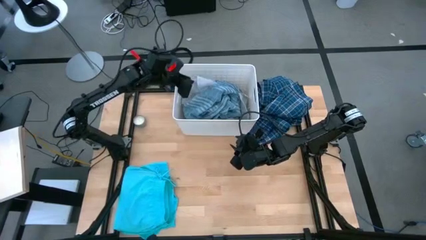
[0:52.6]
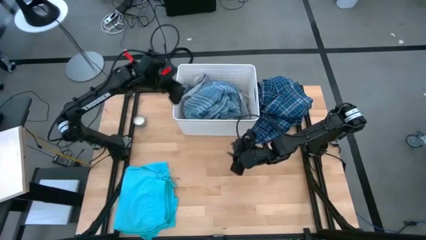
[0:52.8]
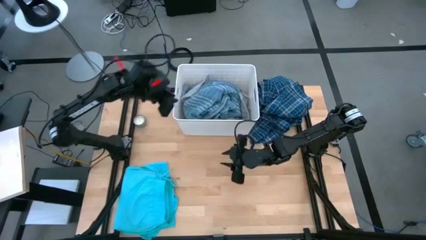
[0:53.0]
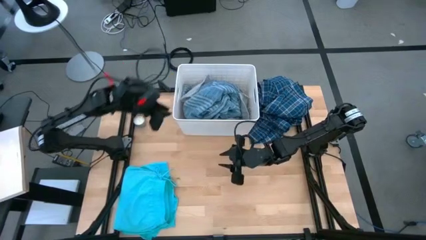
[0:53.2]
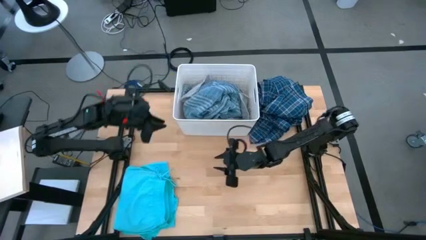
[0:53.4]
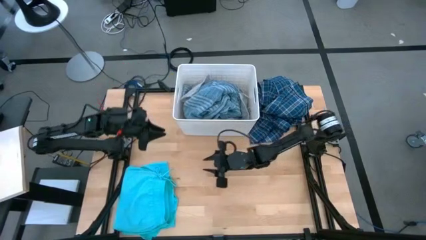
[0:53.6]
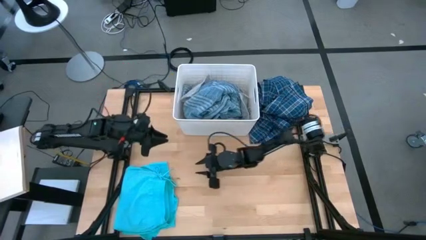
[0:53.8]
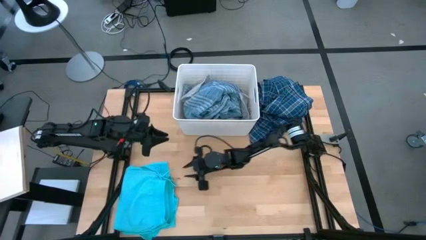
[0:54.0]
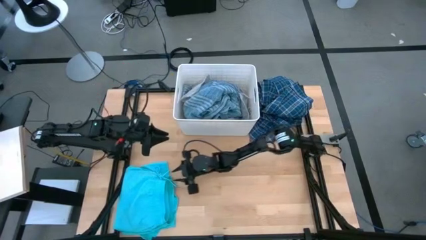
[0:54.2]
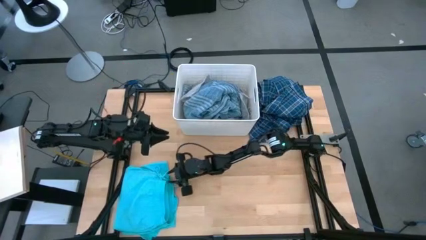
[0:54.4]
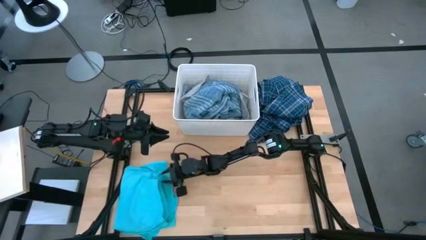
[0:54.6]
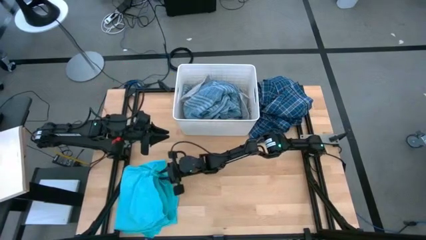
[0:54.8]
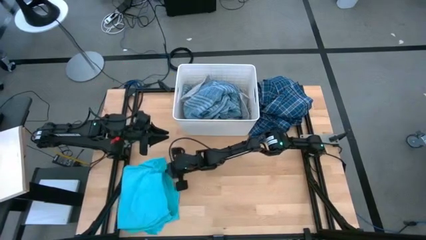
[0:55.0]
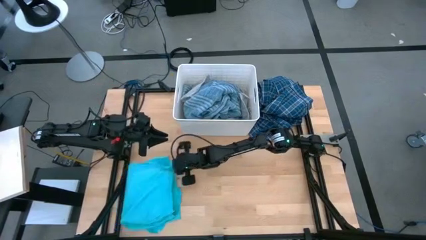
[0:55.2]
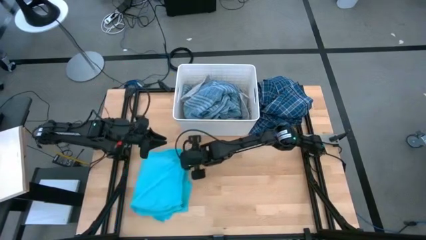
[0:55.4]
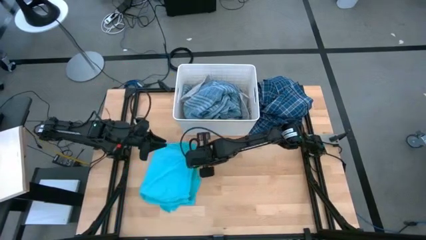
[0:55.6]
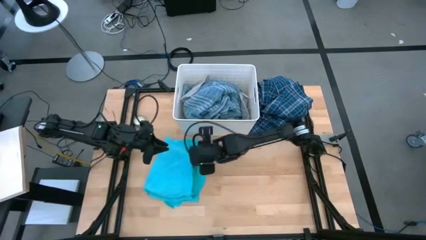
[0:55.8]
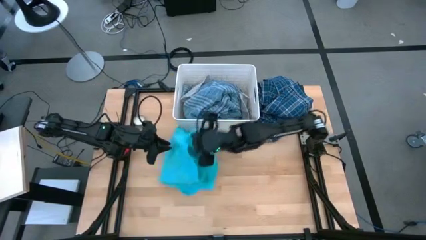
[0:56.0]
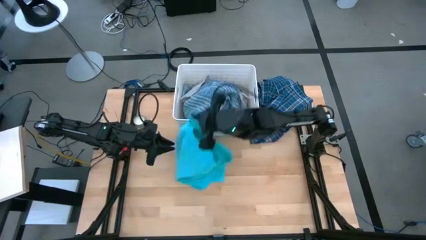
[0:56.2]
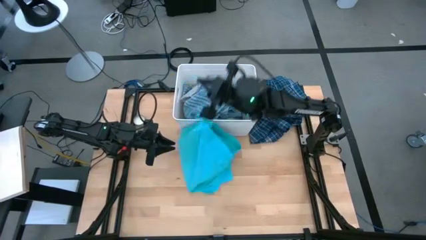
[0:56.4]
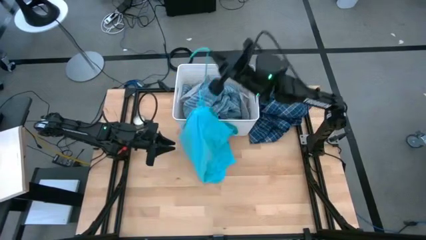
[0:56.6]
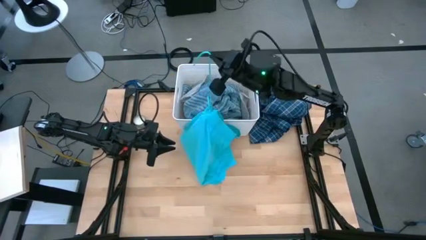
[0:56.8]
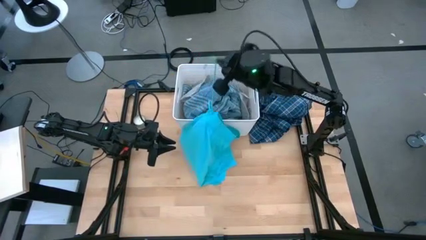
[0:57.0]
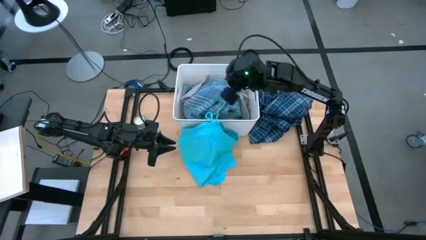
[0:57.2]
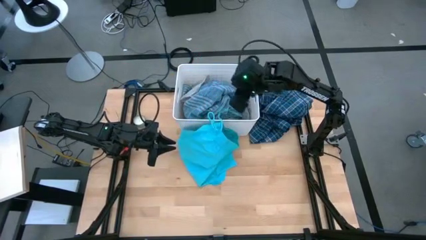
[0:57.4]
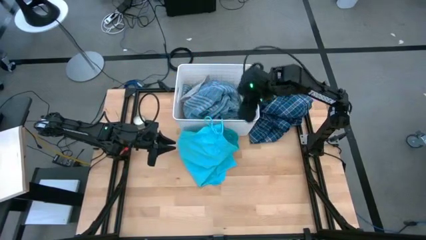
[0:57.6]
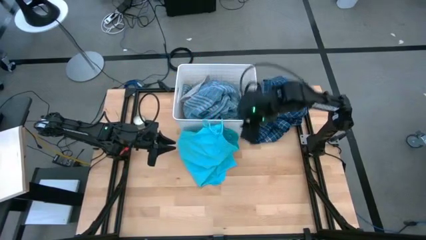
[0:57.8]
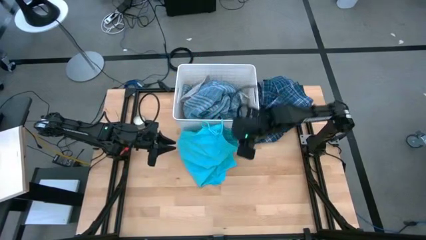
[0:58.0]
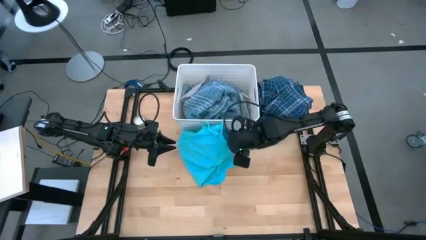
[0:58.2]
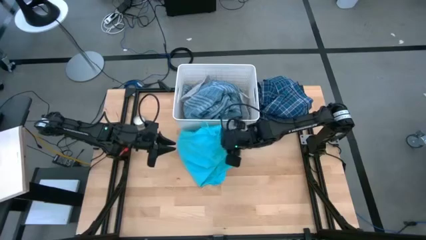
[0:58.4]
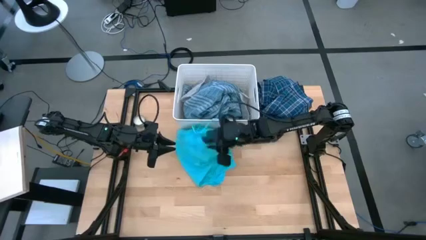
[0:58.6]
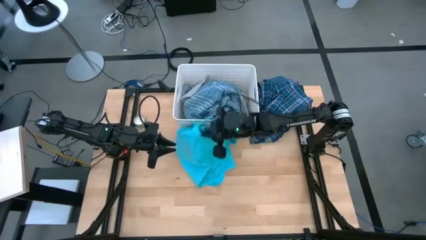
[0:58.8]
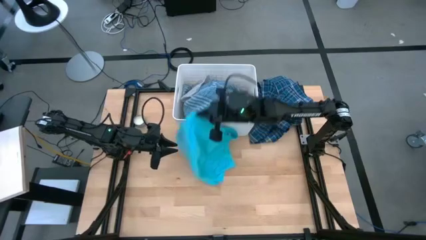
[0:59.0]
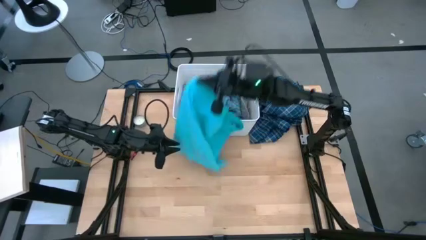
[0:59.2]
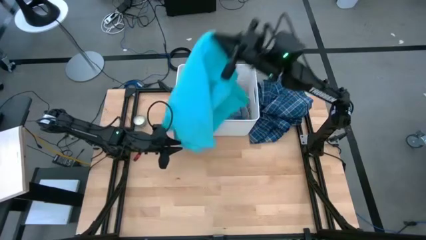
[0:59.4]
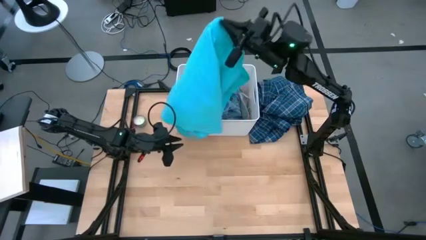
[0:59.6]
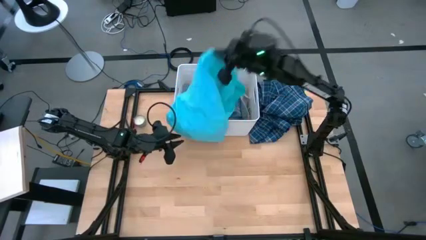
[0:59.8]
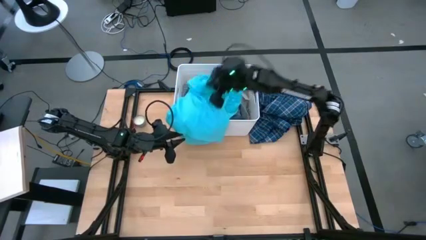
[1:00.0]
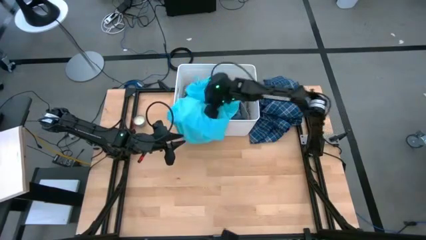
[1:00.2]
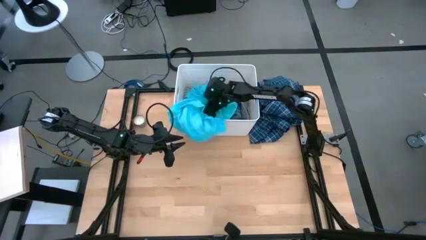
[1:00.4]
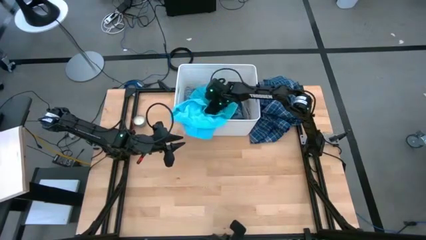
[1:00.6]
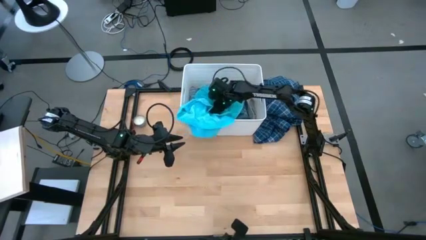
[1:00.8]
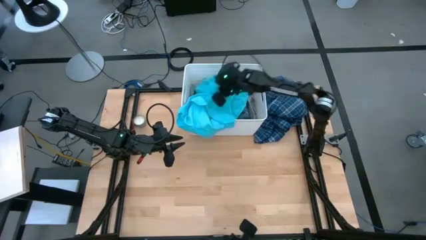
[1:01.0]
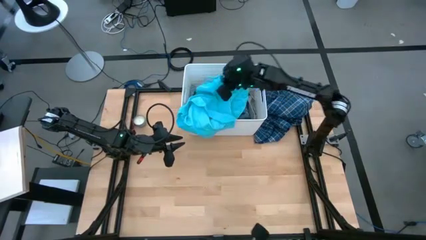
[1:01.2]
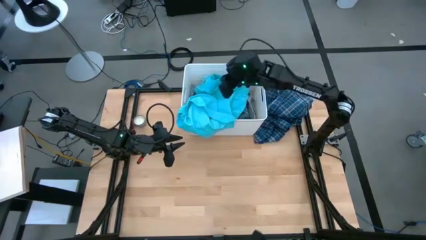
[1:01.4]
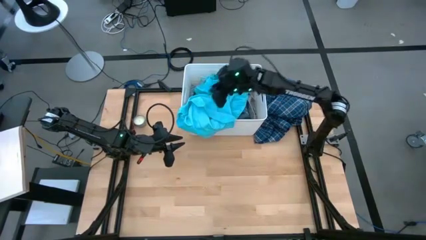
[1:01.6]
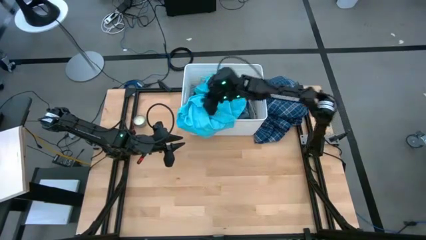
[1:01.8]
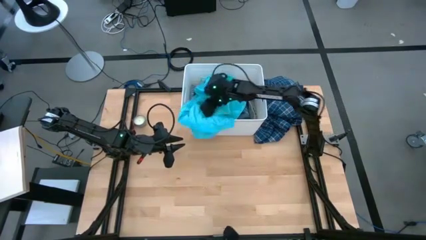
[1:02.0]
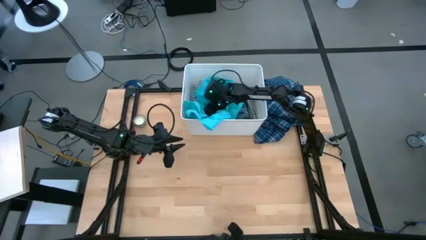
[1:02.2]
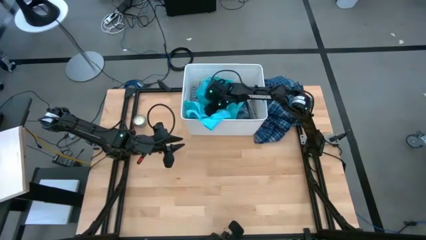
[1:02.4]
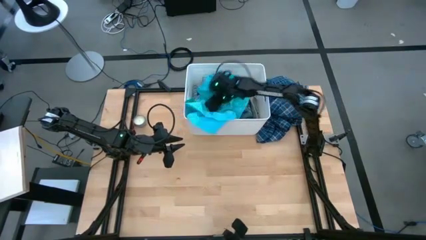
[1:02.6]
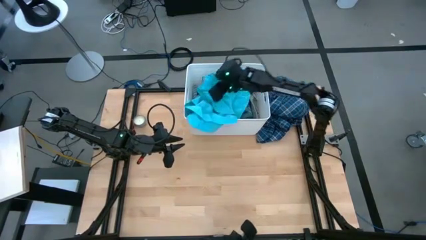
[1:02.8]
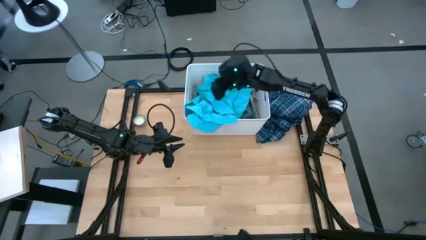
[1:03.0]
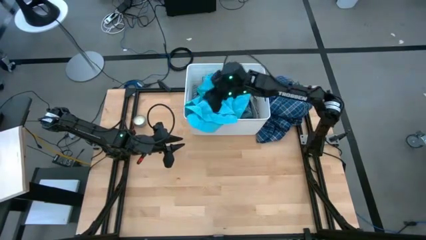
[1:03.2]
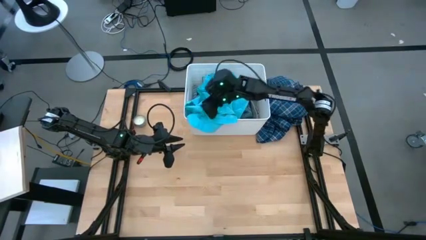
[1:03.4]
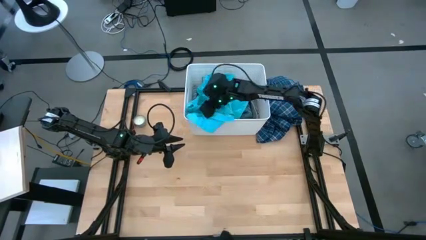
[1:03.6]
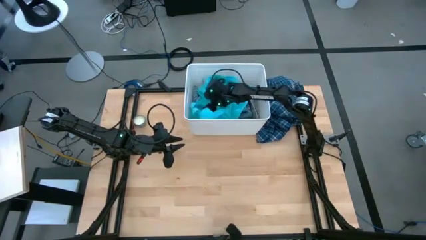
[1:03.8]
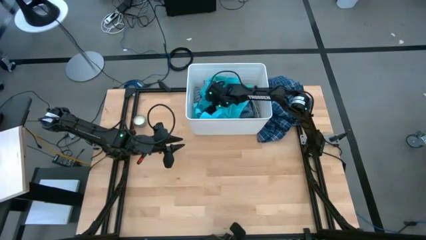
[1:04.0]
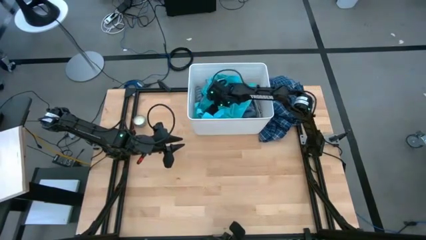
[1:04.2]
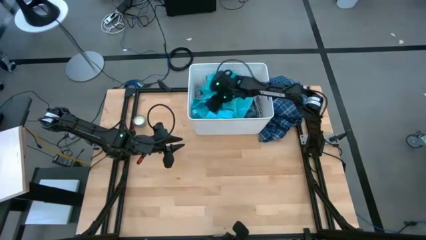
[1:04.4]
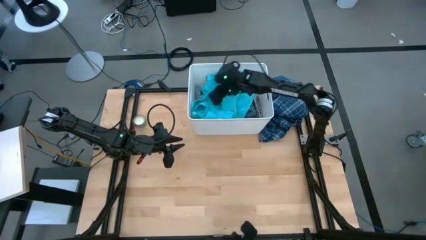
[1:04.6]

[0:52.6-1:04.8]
Task: Sort clothes
Put the light blue shorts into the white laundry bin

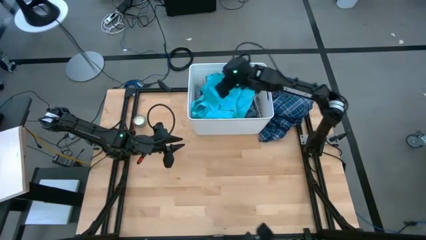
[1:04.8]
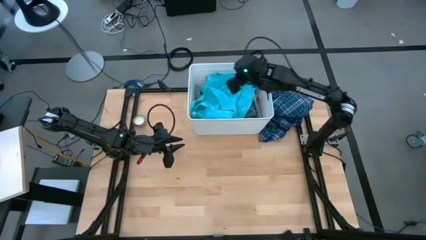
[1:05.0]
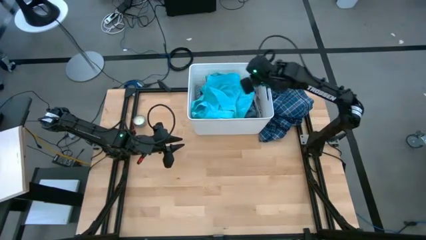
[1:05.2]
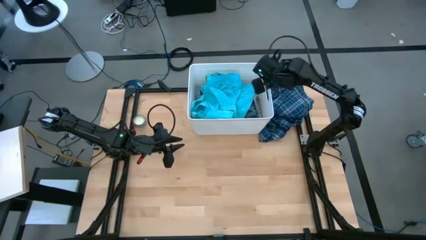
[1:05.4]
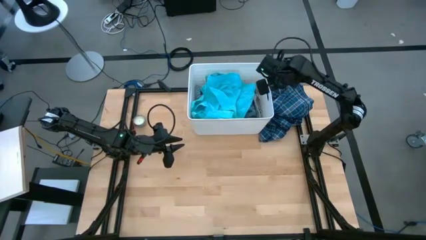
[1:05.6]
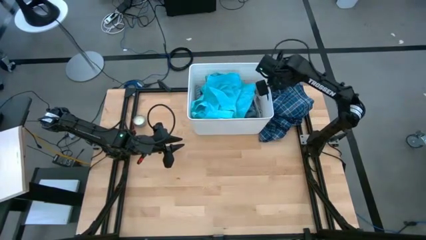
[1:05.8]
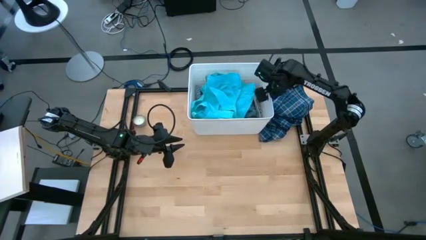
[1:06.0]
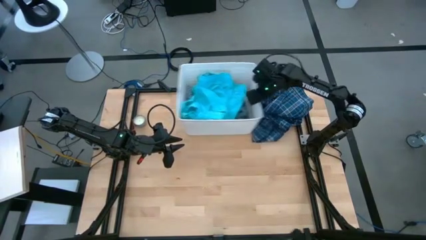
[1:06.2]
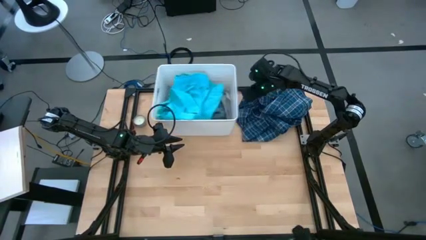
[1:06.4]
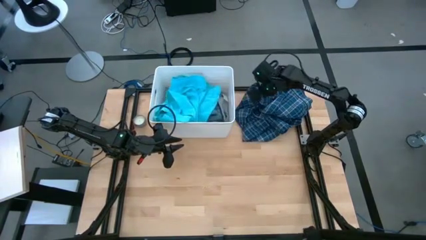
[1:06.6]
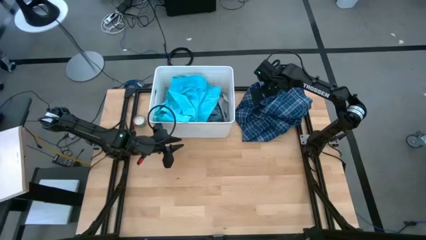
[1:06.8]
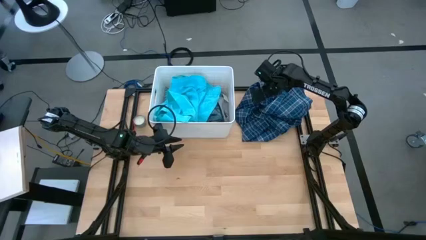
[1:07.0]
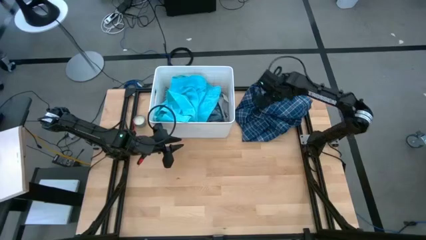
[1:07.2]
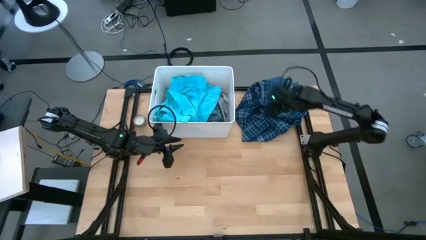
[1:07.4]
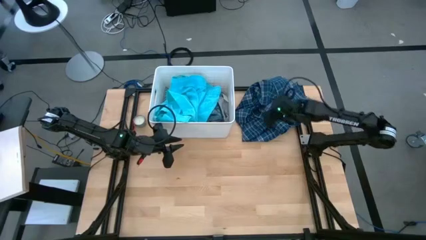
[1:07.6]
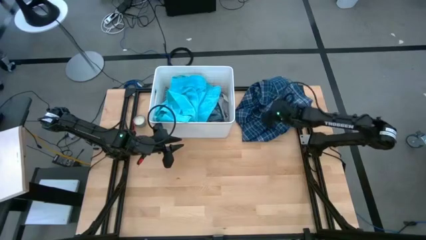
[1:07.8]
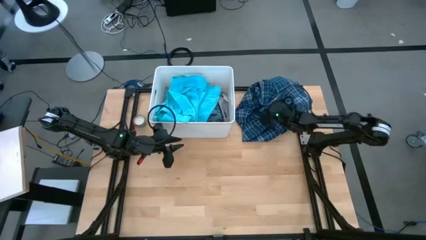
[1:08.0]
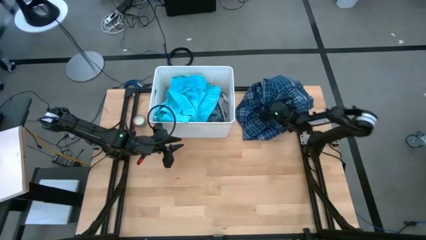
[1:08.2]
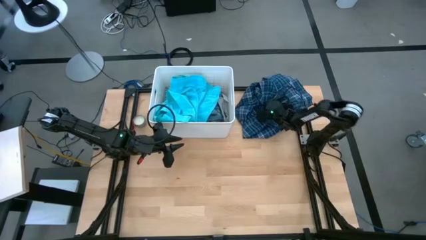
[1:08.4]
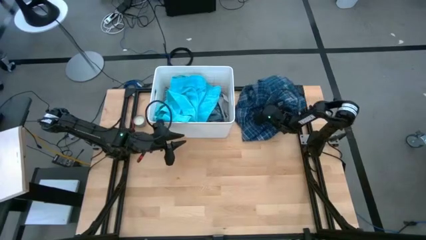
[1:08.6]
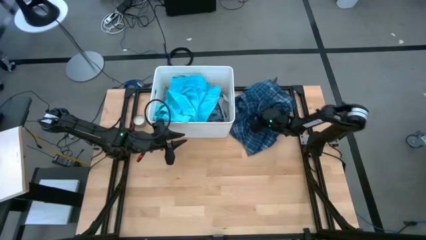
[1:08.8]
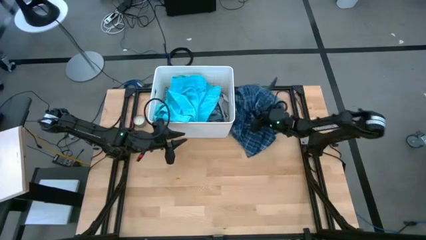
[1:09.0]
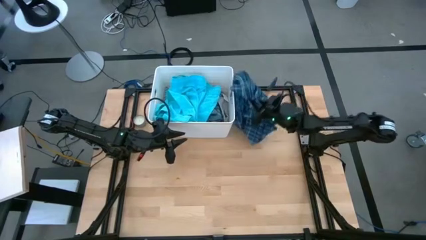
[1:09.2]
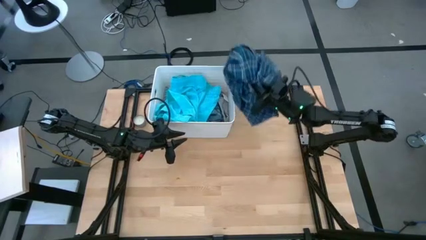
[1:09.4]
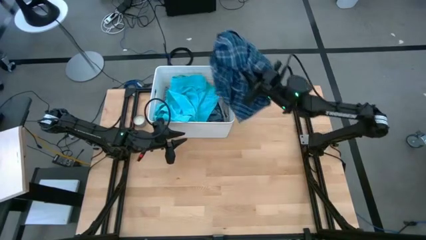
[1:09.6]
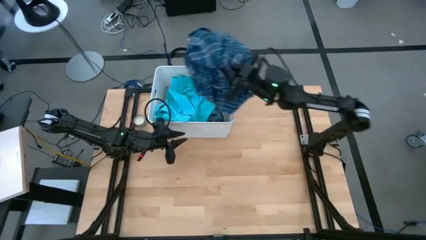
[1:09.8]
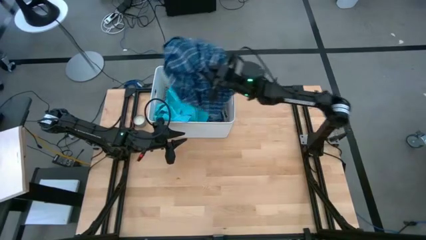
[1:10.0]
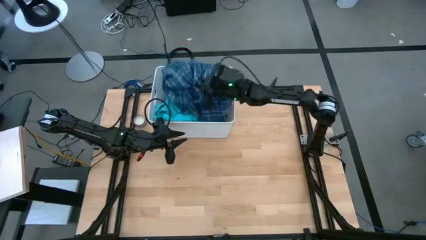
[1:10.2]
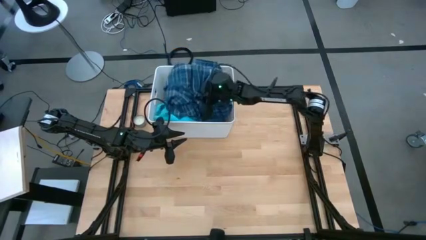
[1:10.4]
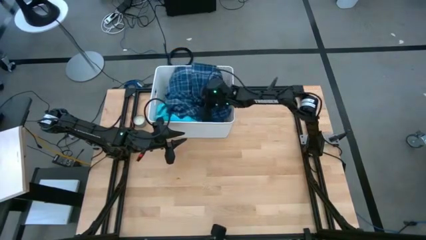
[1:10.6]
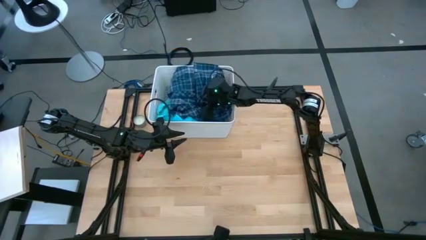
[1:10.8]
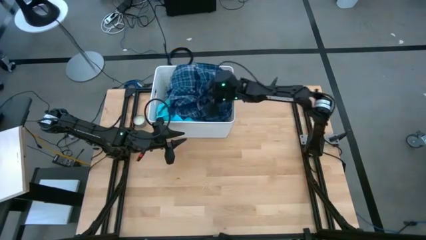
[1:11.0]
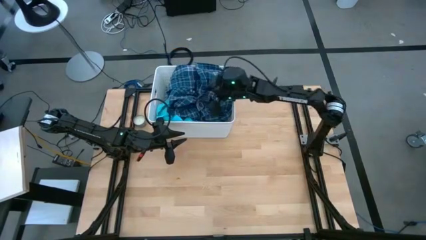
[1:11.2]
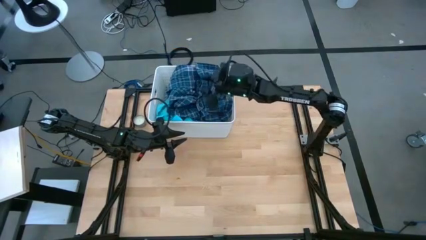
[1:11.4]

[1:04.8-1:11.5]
Put the blue shirt into the white laundry bin
